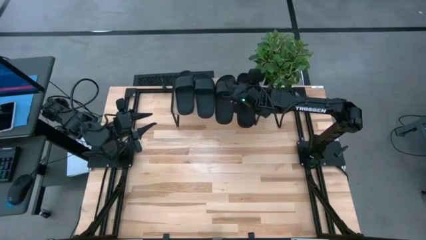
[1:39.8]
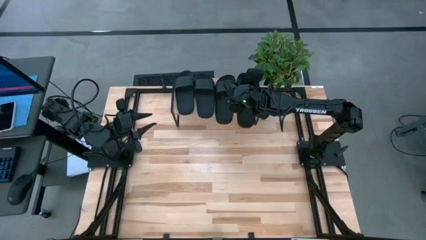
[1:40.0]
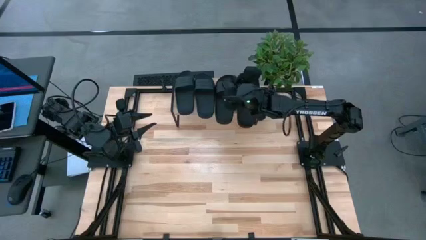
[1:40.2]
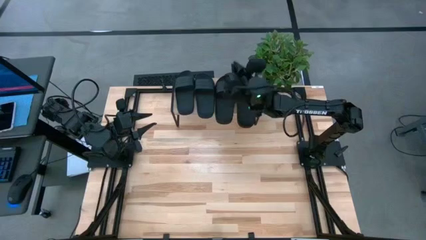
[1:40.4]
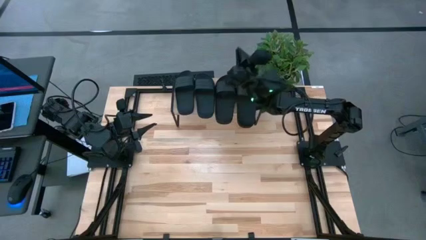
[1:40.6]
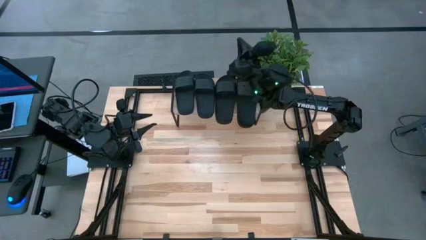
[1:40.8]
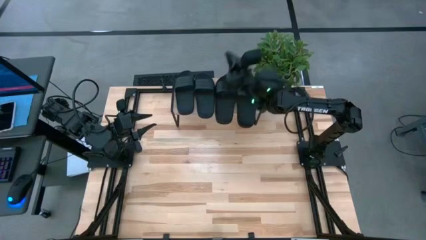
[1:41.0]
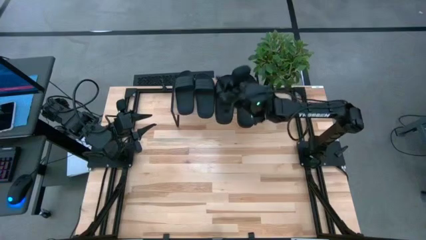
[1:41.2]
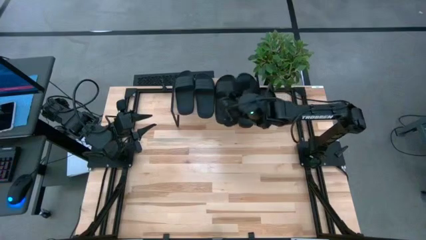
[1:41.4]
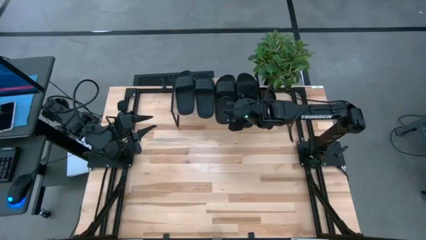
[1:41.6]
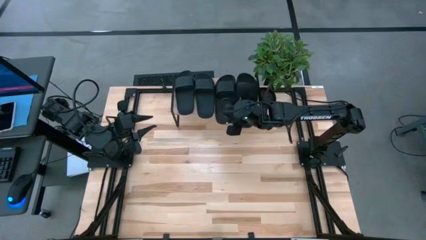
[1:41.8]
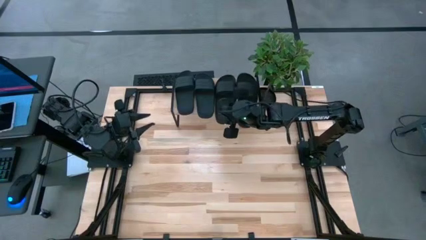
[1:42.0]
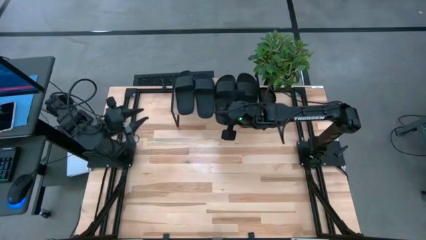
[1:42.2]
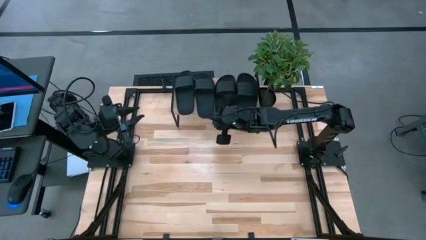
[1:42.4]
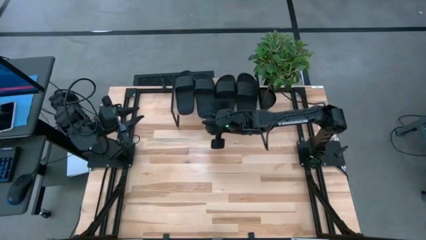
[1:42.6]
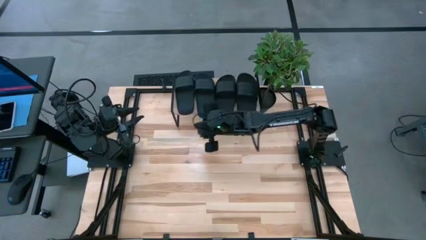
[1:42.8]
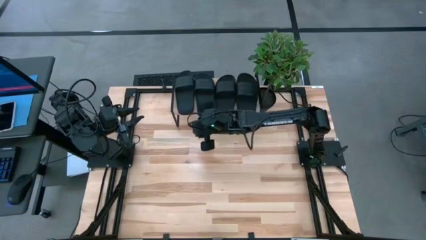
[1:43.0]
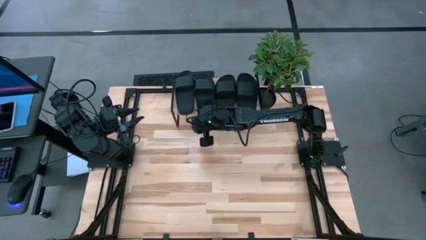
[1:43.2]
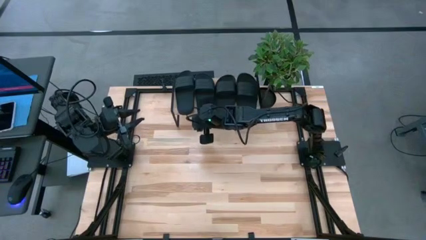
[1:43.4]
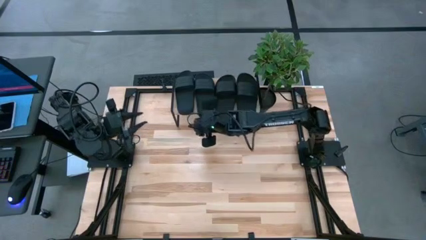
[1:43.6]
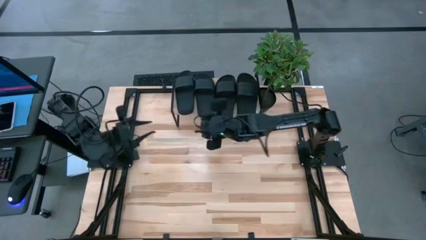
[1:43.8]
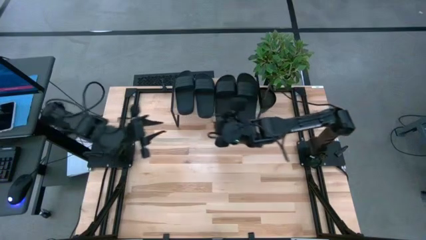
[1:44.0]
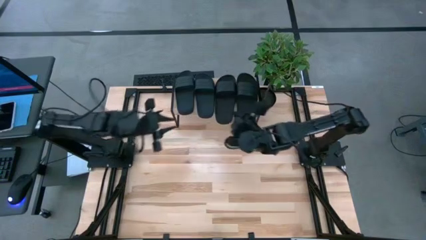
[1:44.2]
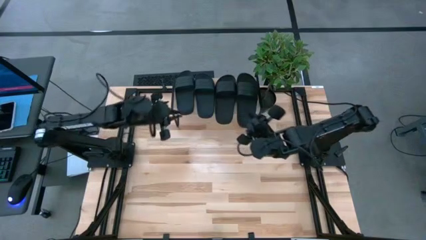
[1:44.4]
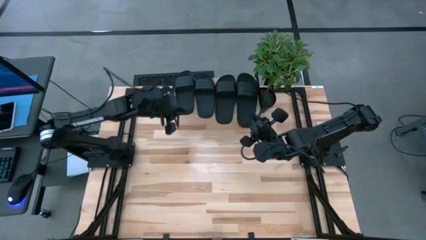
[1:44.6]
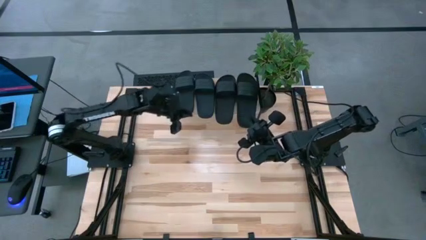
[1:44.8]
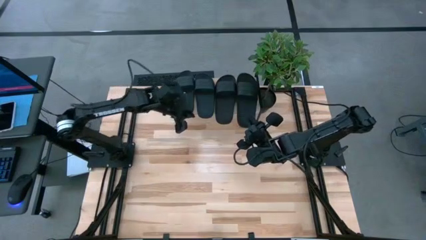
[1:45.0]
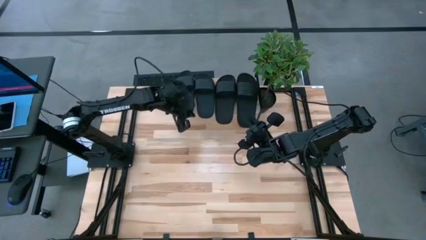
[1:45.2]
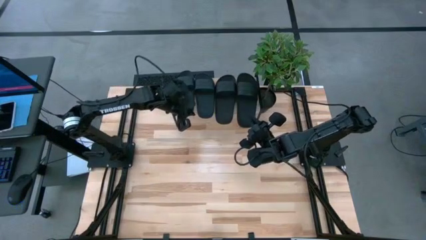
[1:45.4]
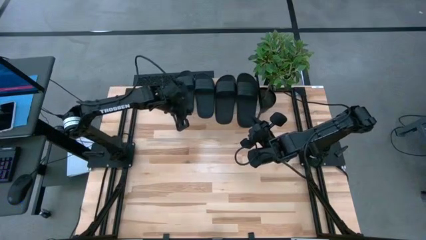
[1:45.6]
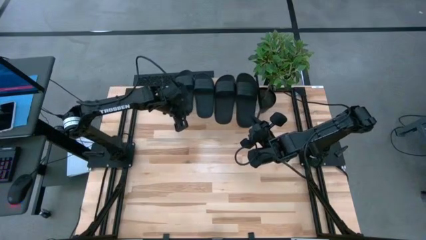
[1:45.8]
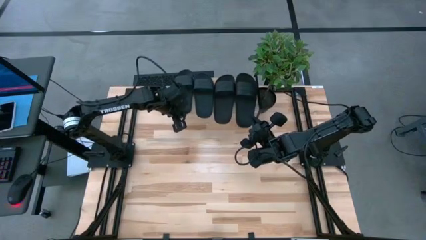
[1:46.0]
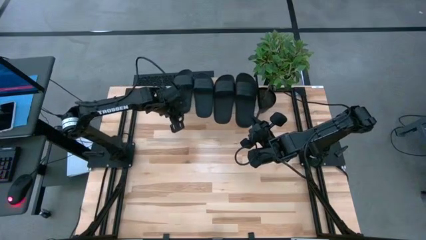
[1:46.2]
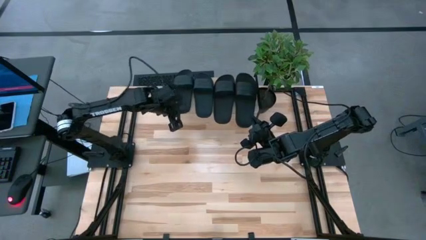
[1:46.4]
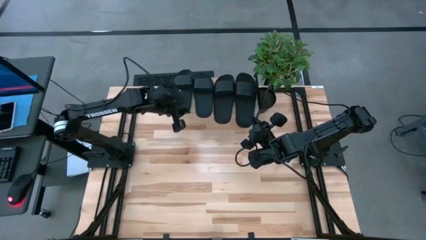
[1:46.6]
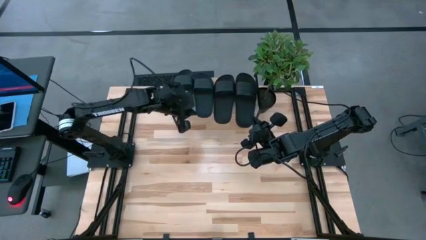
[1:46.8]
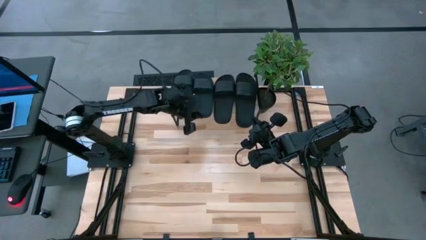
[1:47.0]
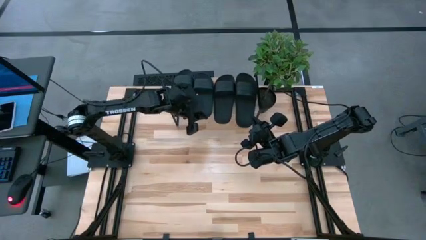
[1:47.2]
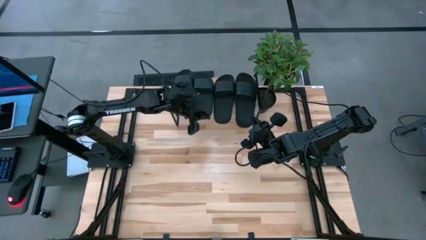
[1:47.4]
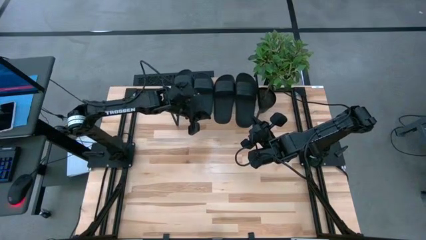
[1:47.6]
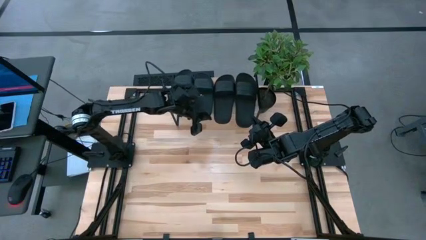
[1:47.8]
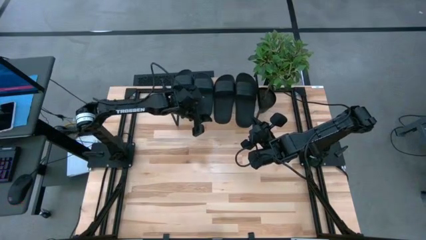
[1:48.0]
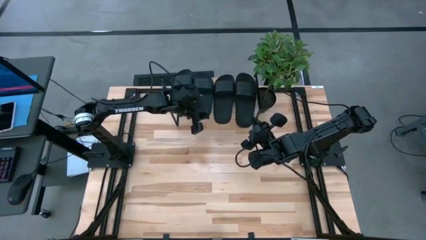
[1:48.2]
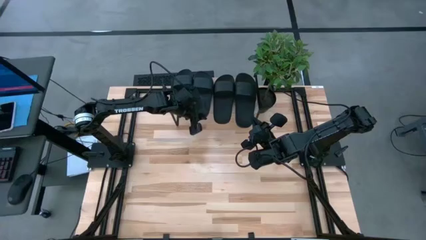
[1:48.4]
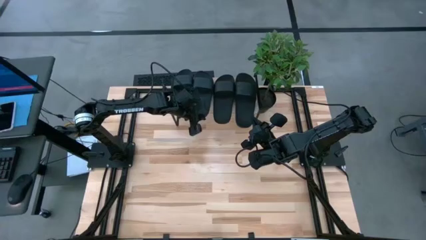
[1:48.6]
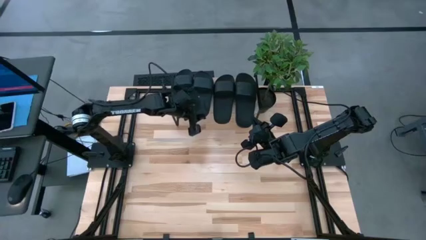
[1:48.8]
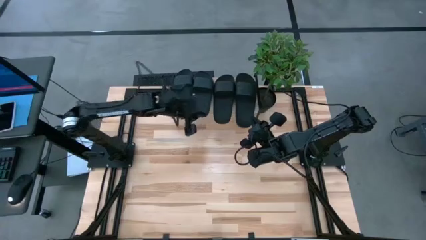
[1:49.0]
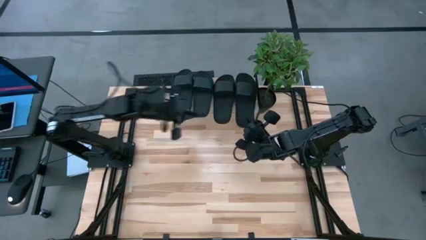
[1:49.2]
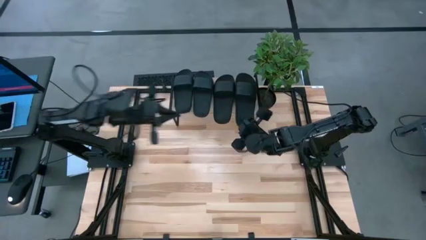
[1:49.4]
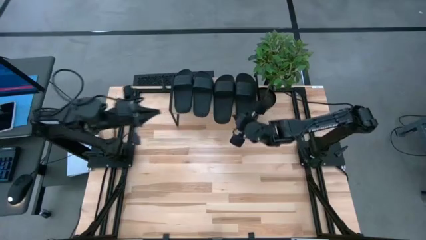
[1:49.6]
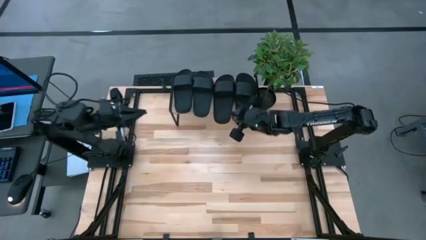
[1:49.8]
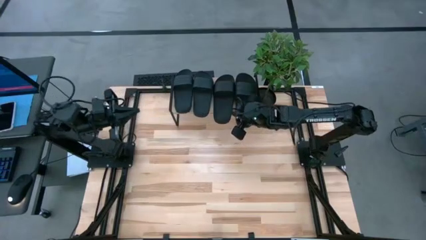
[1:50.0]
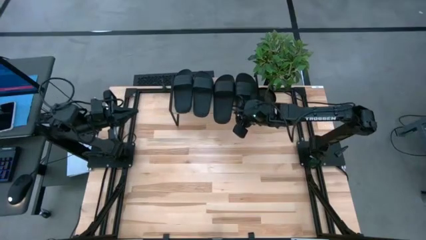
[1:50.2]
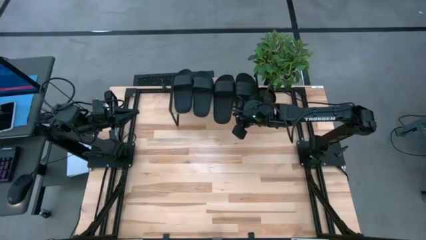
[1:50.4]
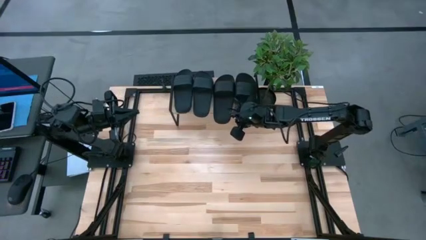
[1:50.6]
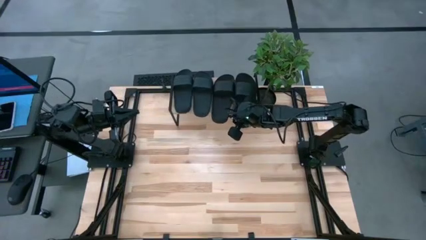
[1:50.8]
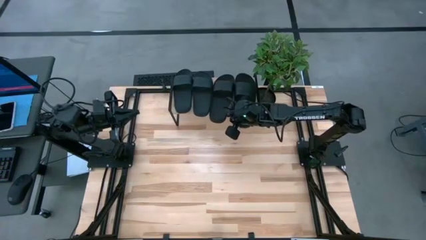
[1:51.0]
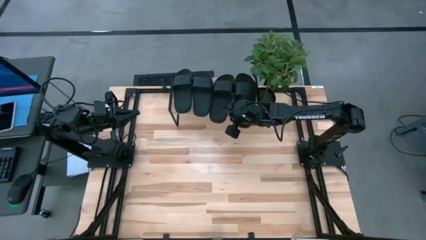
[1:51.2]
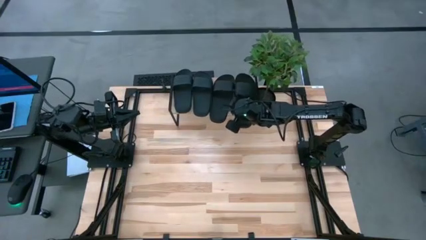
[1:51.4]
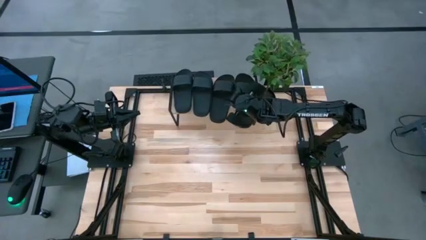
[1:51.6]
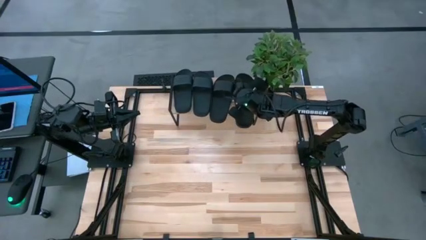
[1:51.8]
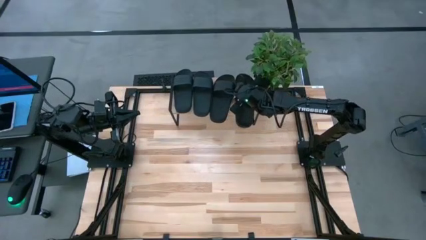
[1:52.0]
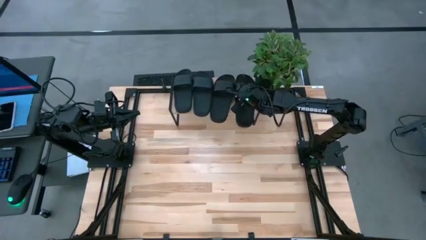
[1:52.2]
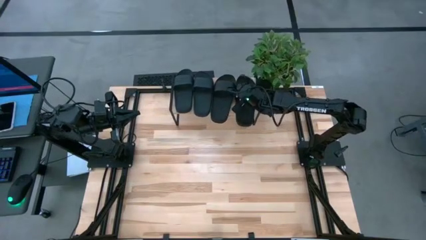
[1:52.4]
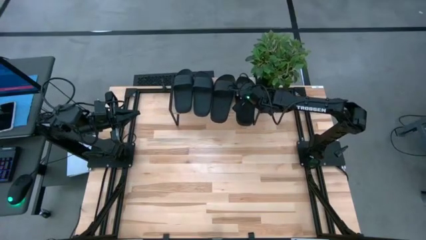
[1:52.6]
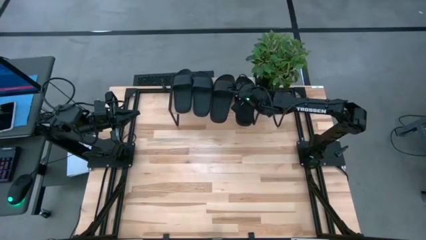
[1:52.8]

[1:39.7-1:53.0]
Task: Pick and place slides into the shelf
Adjust the pair slides on the shelf

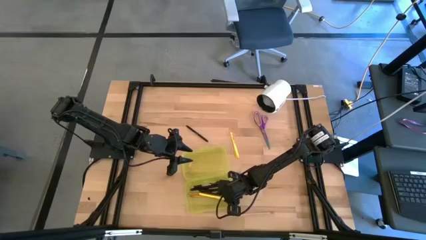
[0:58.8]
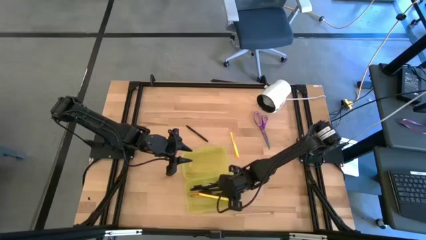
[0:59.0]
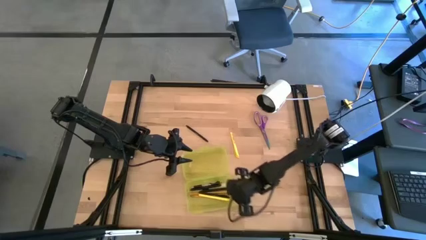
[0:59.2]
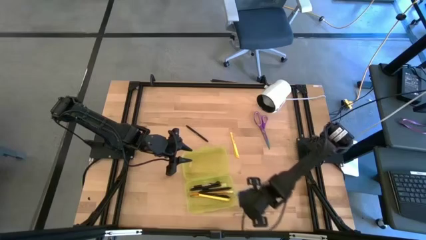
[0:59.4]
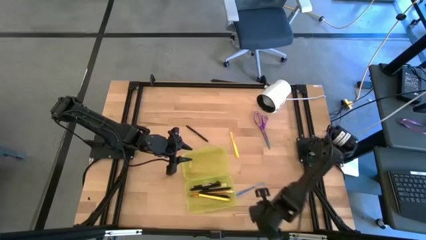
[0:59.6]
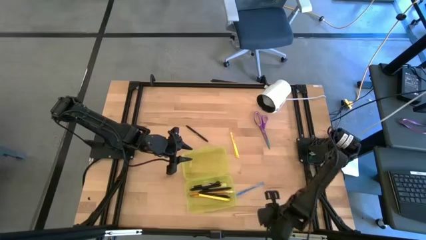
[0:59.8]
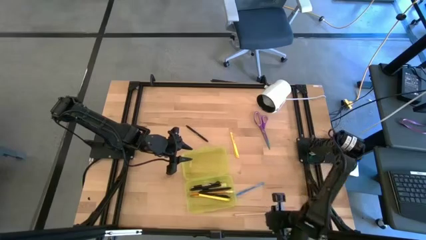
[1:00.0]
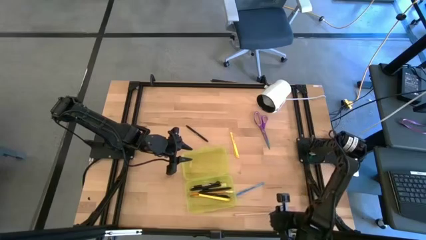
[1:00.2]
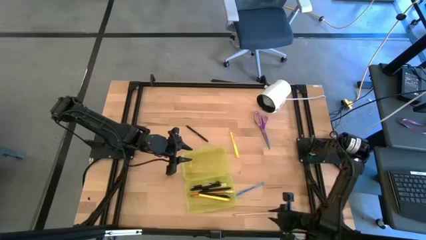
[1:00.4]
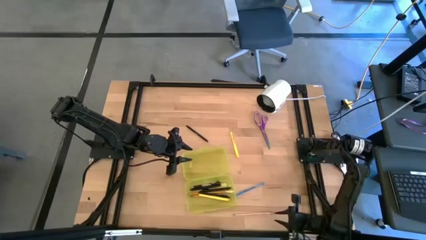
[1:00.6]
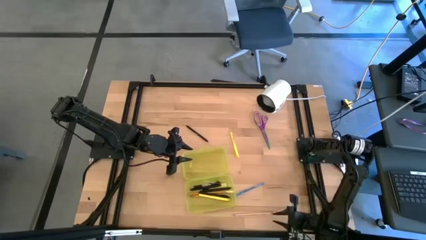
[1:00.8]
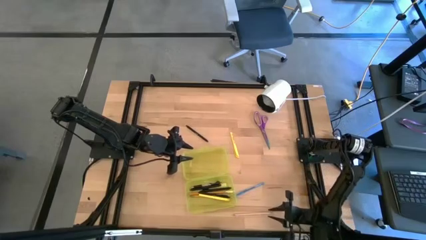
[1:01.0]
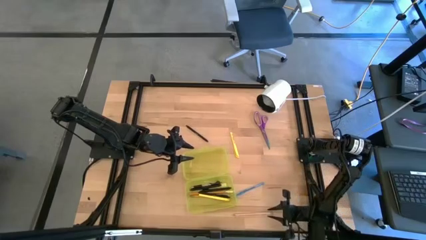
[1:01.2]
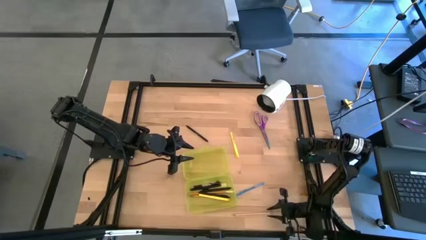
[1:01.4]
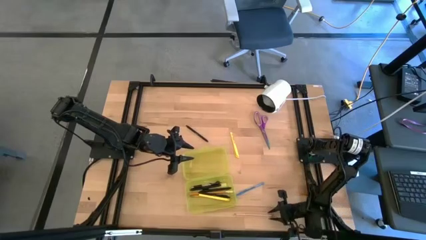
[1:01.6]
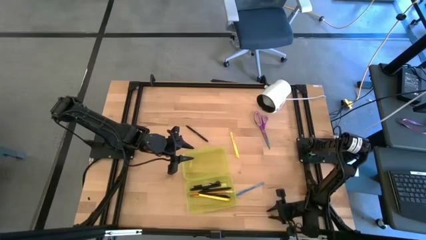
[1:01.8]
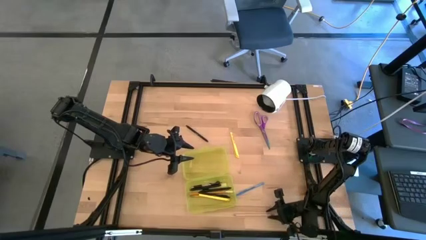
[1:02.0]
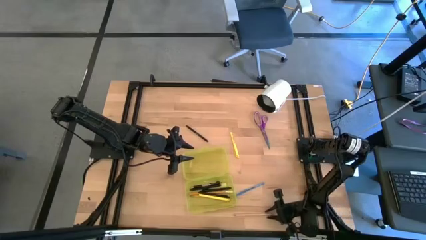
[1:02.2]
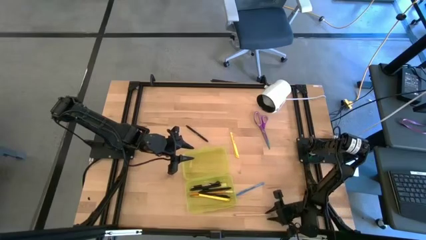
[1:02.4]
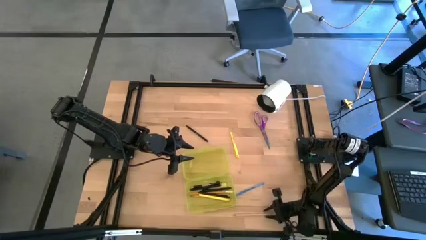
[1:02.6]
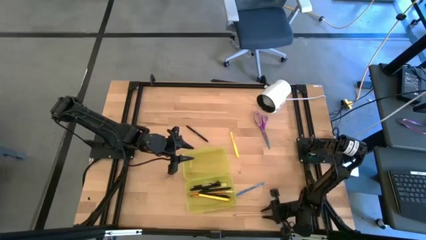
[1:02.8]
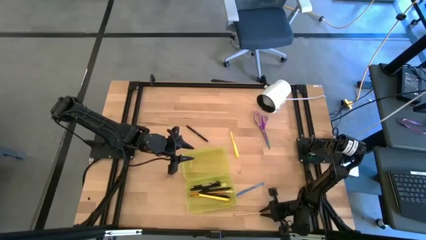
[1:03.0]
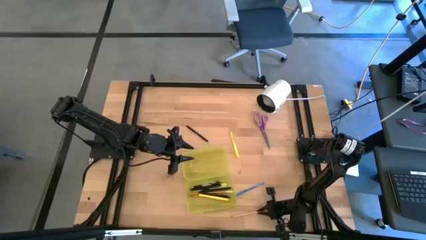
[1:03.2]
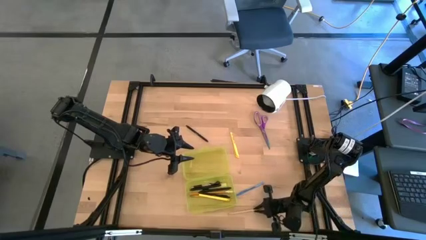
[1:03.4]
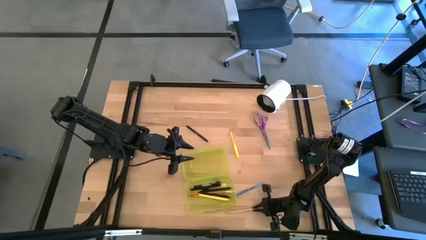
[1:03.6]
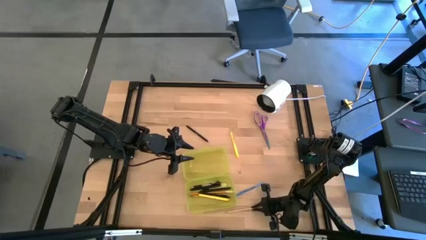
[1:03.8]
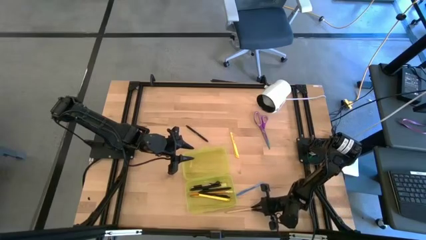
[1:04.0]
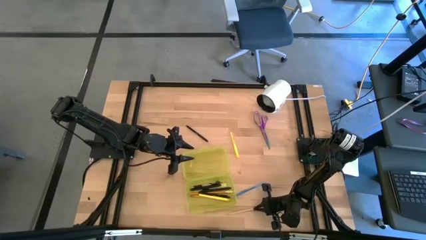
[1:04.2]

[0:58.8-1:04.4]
Task: Pick & place school supplies into a supply box
Put the pink pencil into the yellow supplies box
